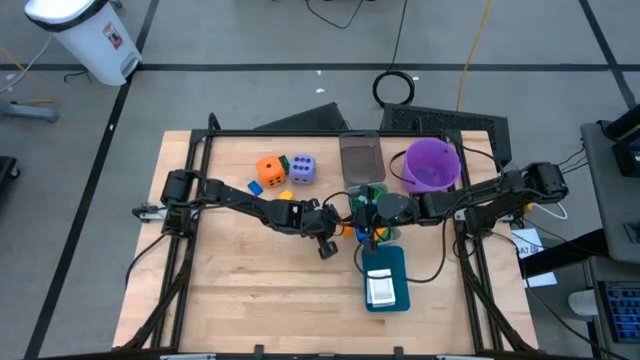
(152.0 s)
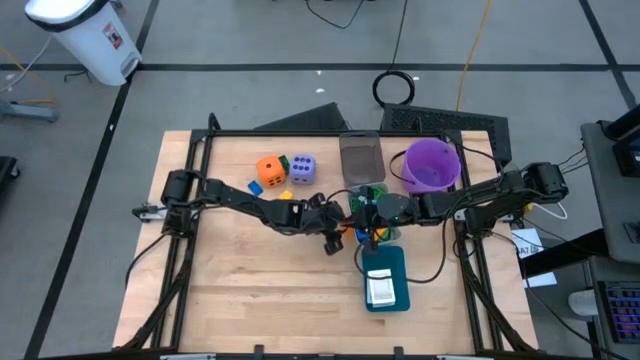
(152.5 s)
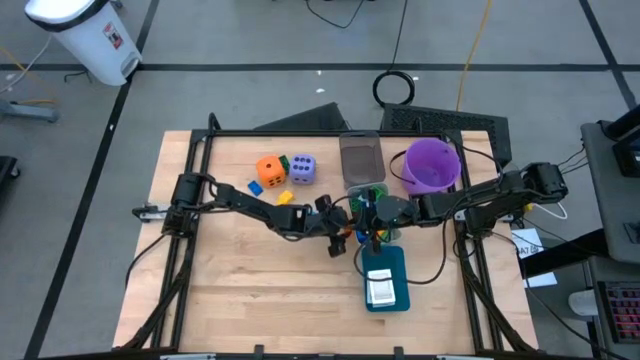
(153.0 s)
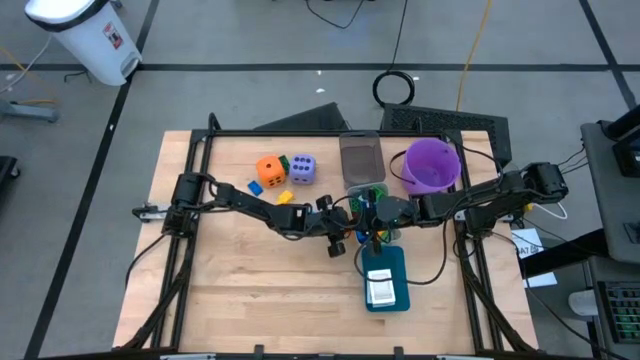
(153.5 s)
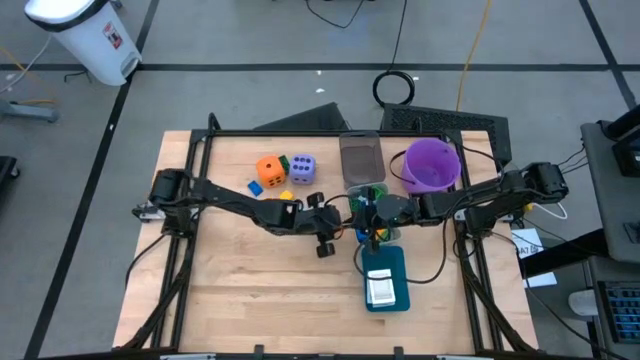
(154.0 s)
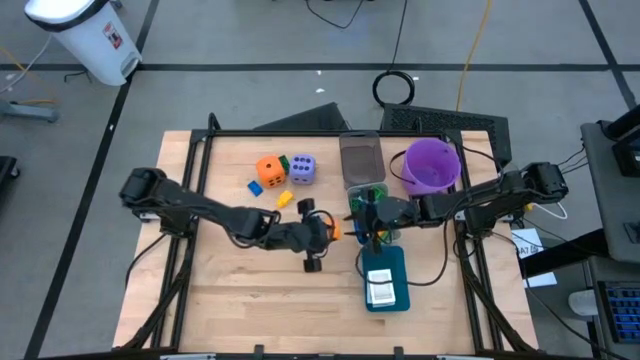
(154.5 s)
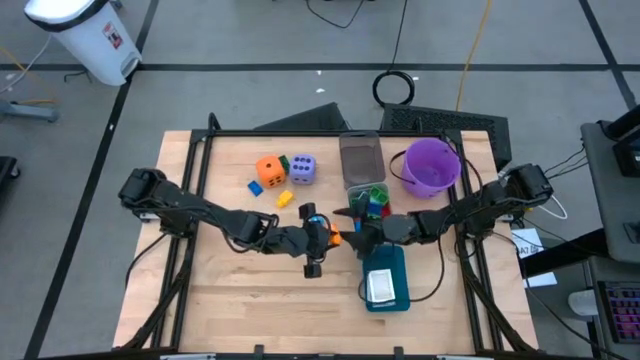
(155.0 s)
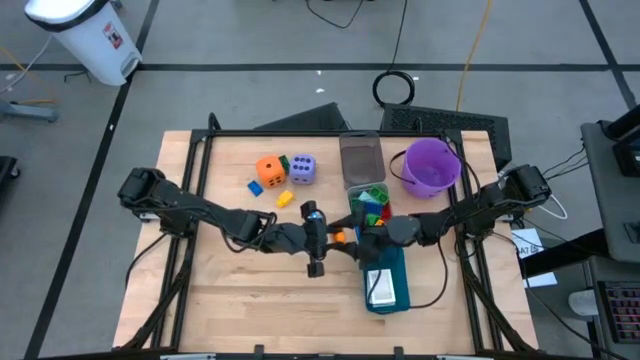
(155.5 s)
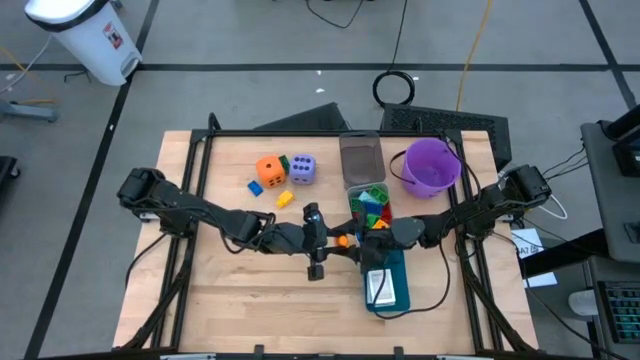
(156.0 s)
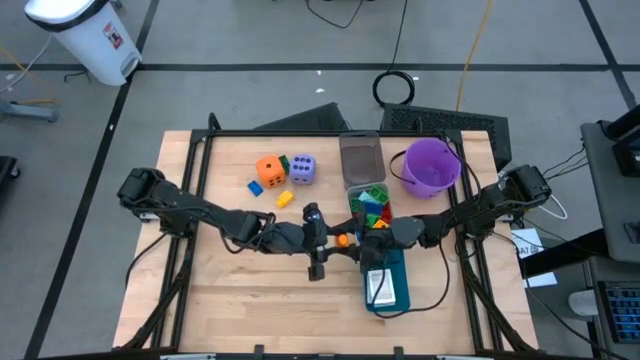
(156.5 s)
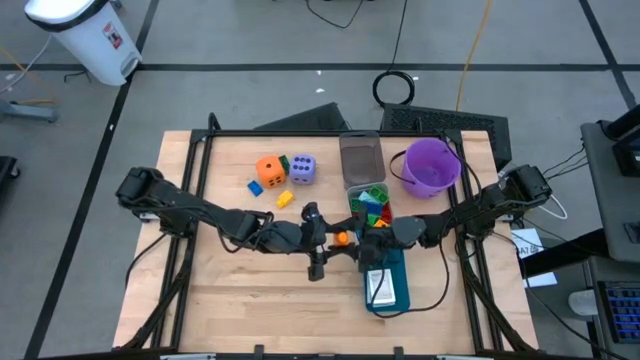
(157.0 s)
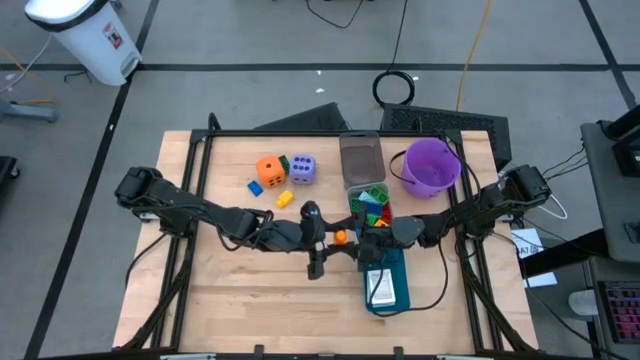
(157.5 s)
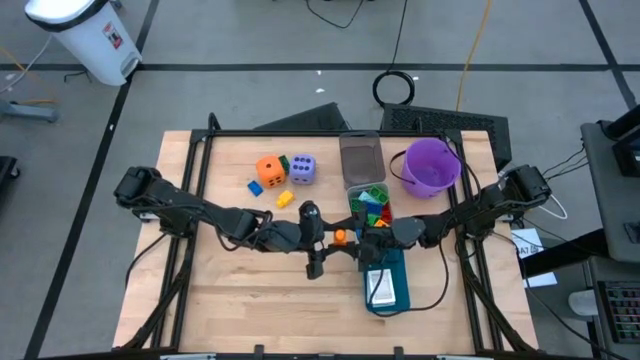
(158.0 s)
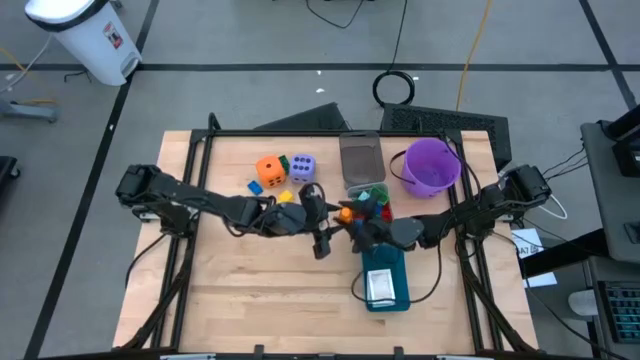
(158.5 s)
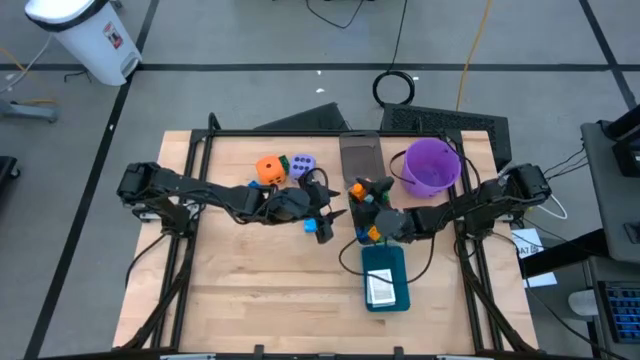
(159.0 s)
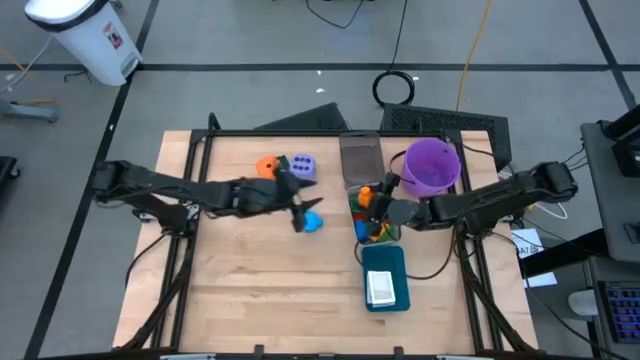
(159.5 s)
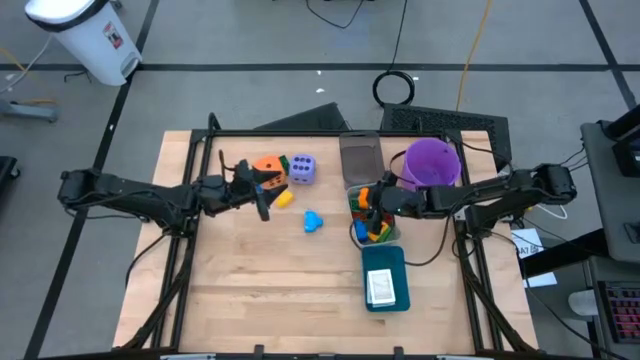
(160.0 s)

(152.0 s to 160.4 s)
Task: Pick & Place Toys
Put the orange game piece into the gray bin

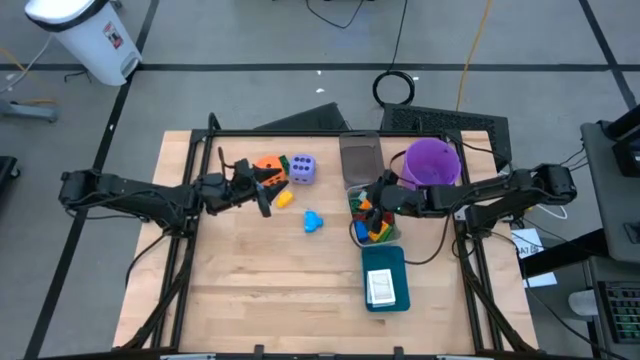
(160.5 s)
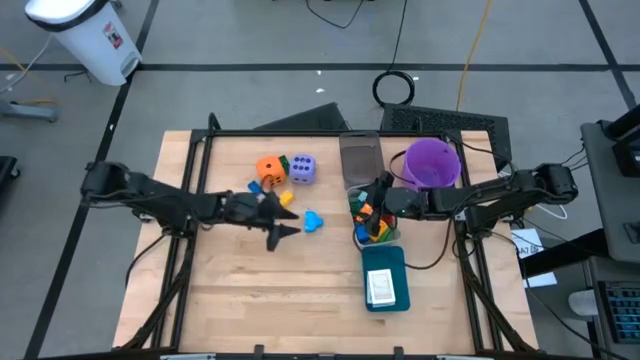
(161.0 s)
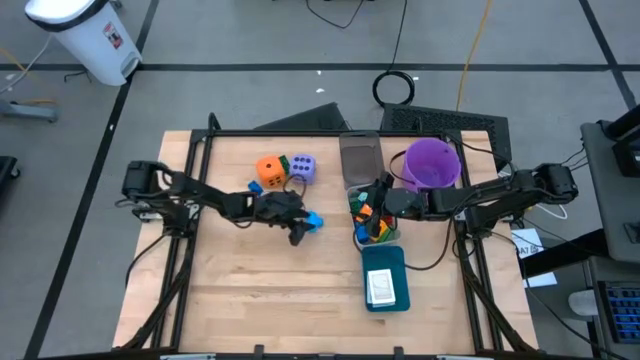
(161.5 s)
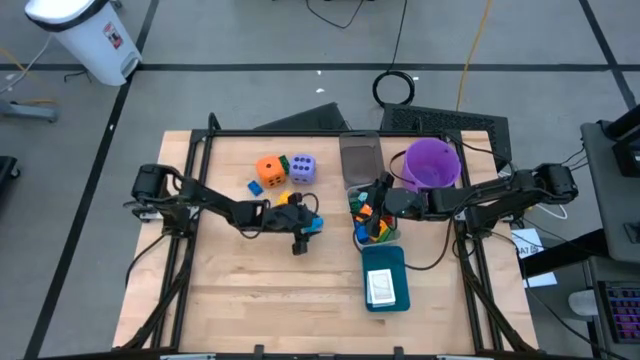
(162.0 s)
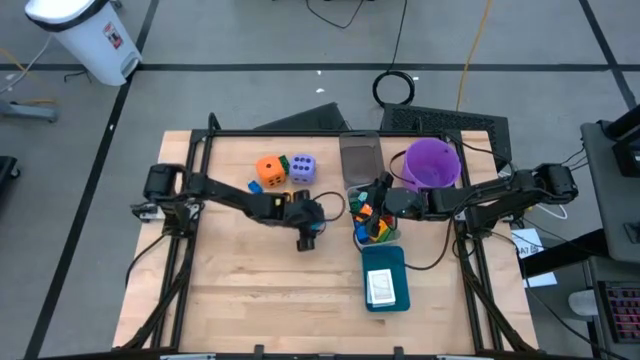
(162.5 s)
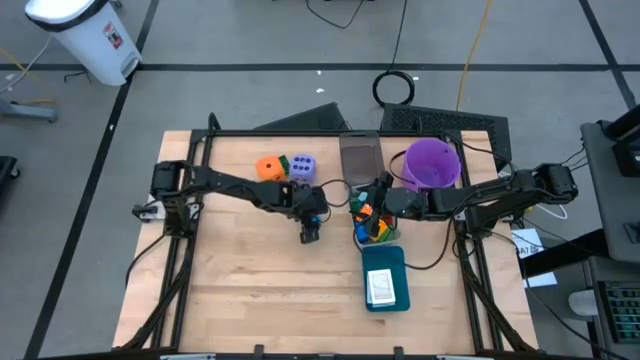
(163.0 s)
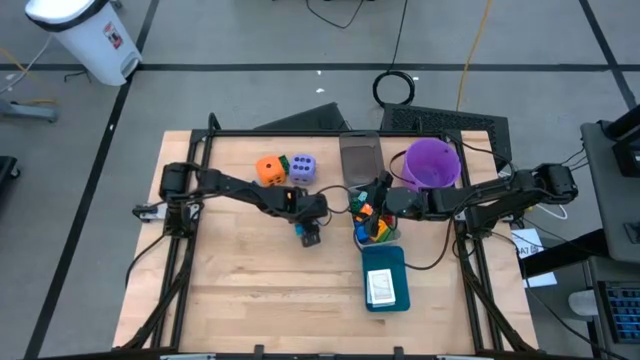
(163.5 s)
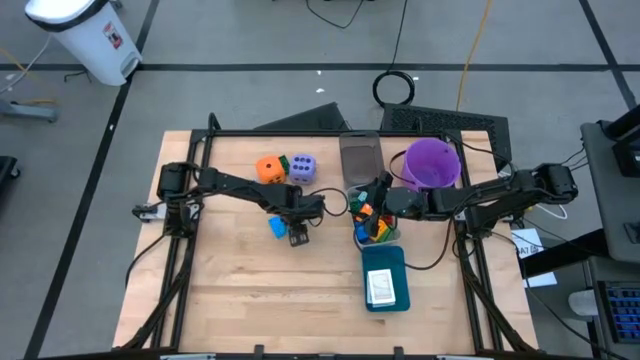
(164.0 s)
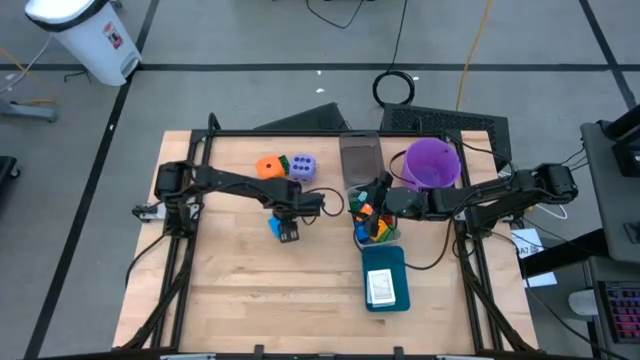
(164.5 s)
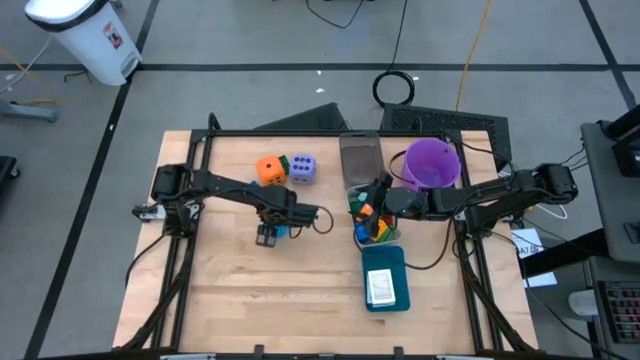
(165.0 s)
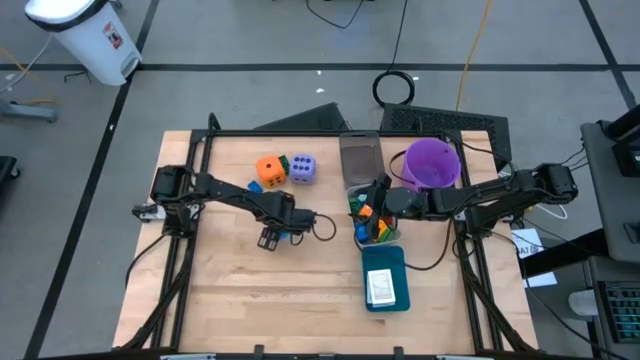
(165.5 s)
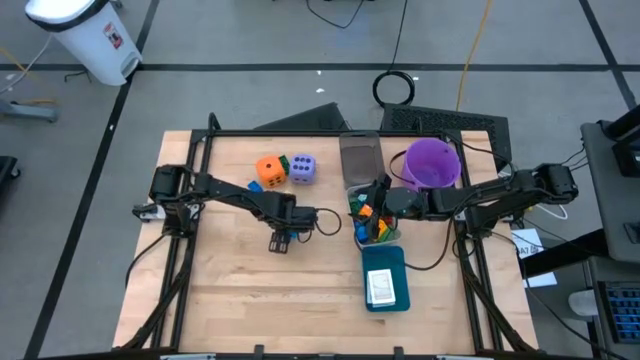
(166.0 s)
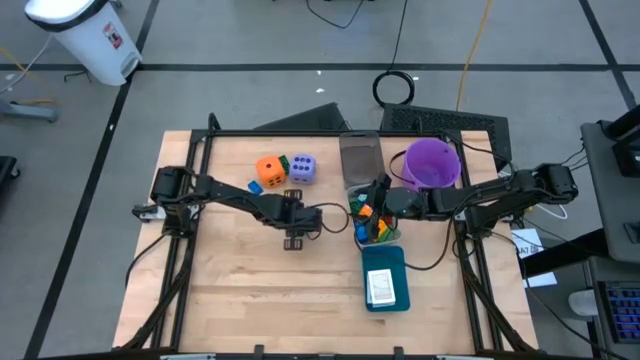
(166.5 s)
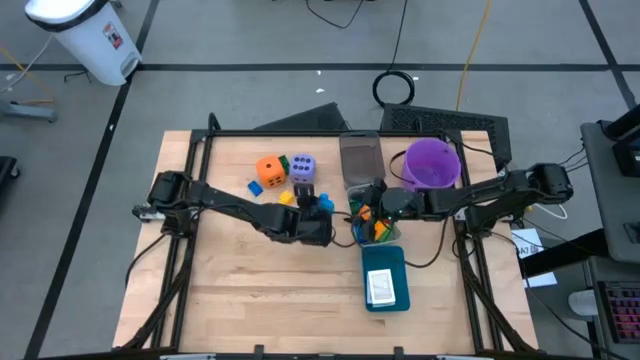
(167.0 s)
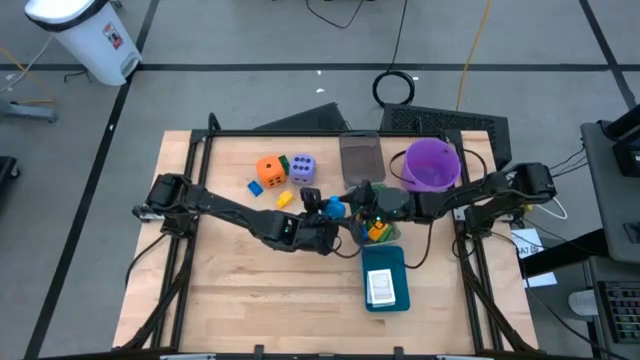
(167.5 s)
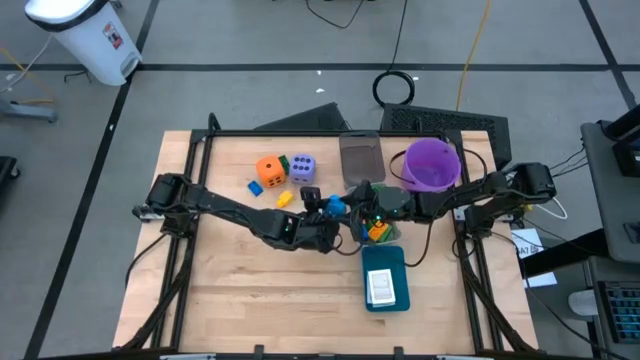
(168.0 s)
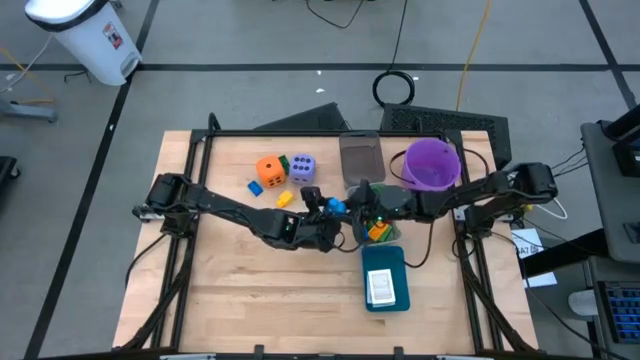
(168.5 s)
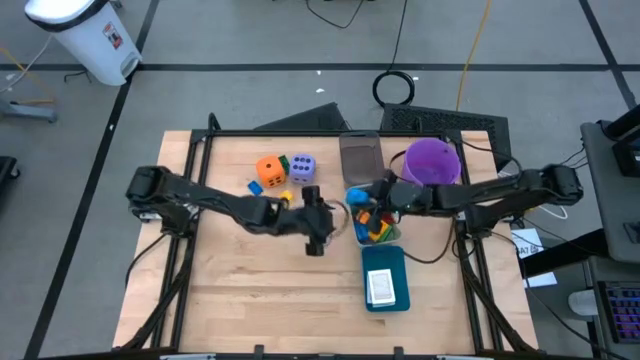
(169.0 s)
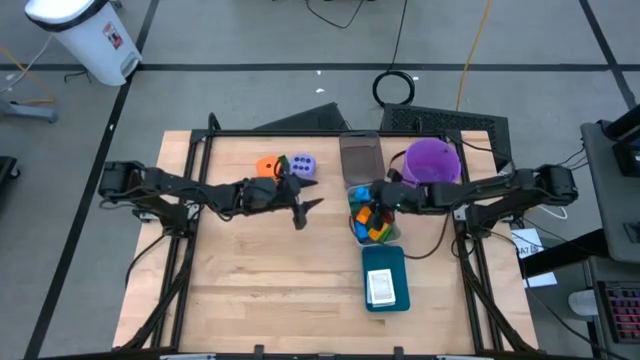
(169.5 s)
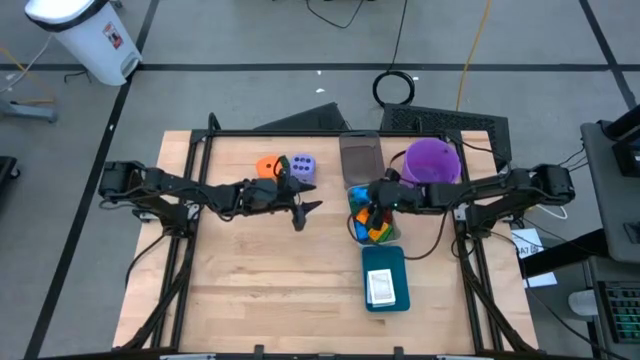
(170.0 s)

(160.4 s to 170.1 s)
Put the blue game piece into the gray bin

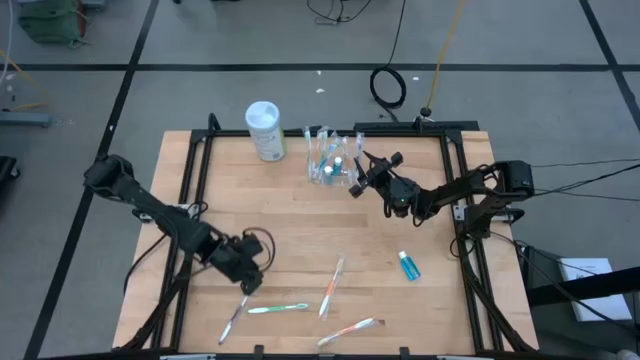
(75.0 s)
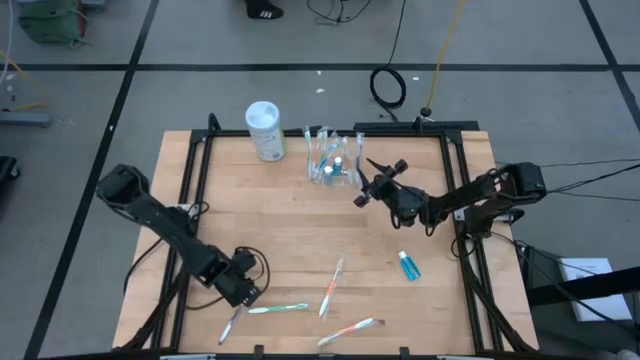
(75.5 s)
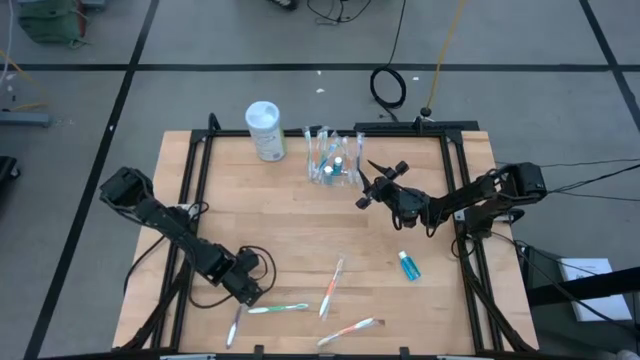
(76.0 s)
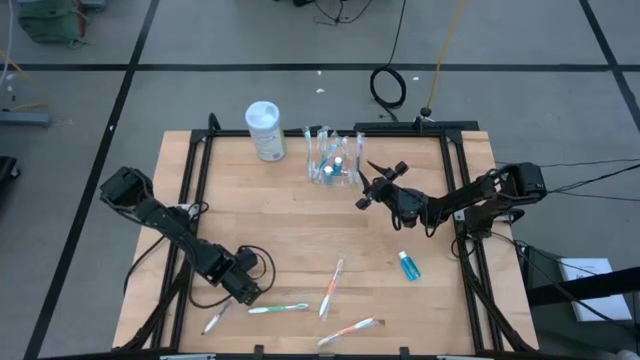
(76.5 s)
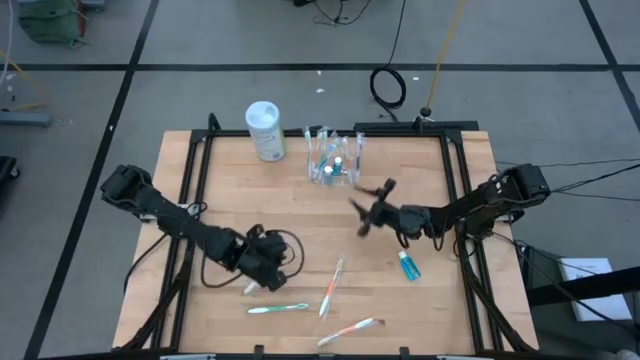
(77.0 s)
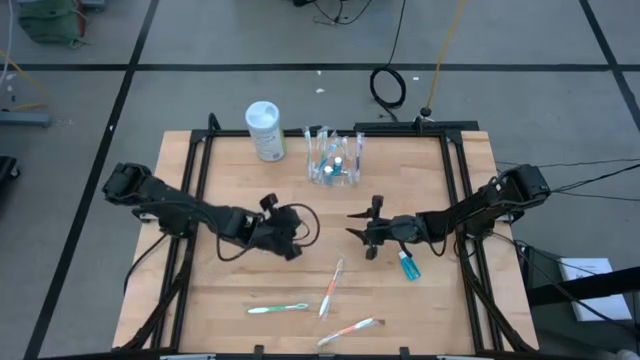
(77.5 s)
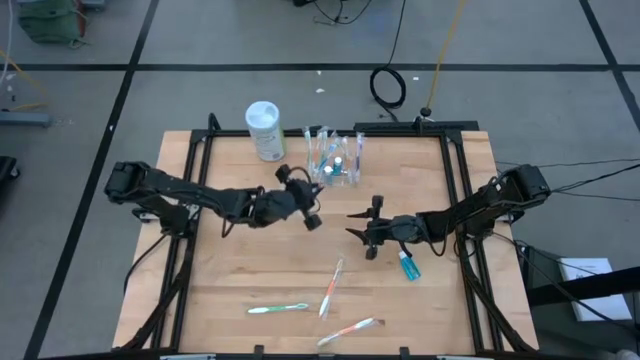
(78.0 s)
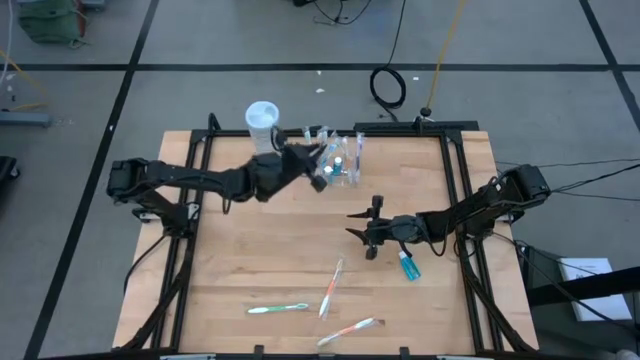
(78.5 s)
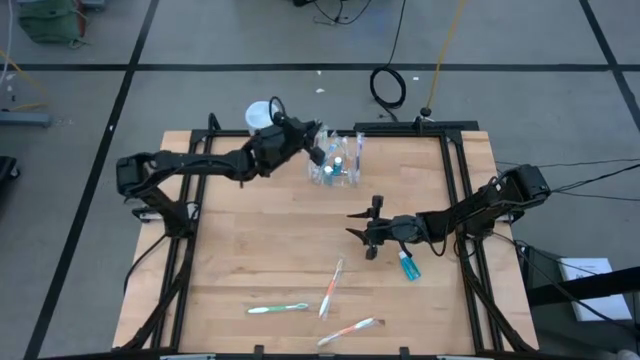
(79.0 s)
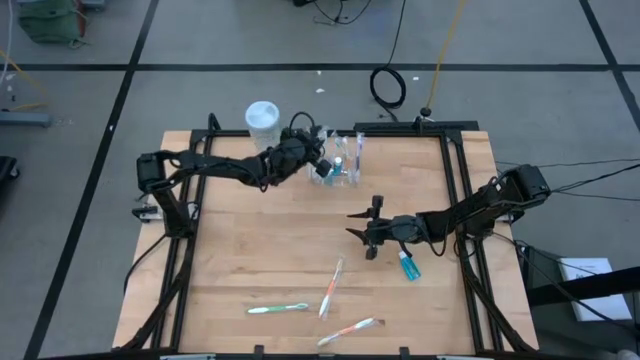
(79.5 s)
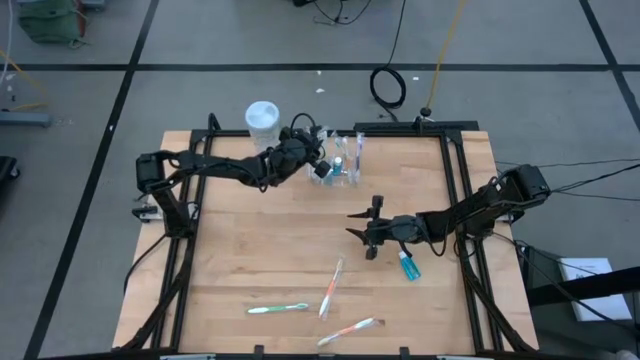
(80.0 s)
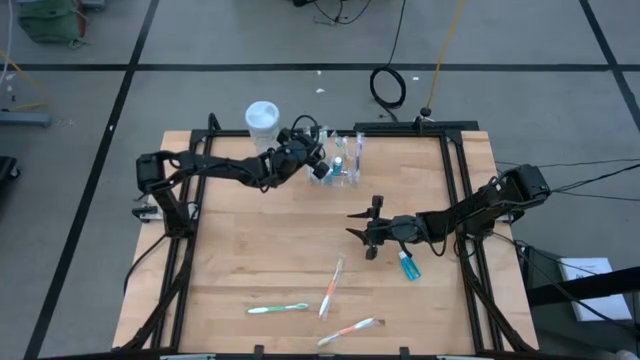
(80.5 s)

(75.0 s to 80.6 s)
Task: Pick & Place toothbrushing station
Put the violet toothbrush into the transparent organizer
